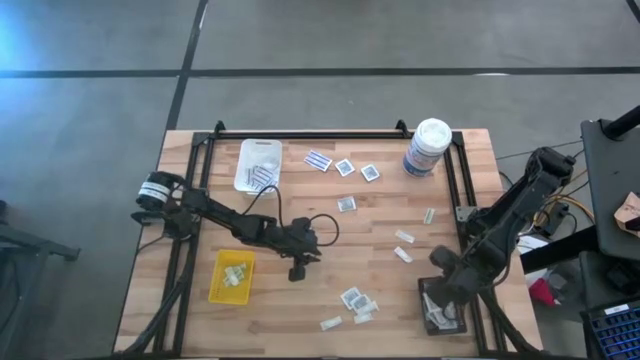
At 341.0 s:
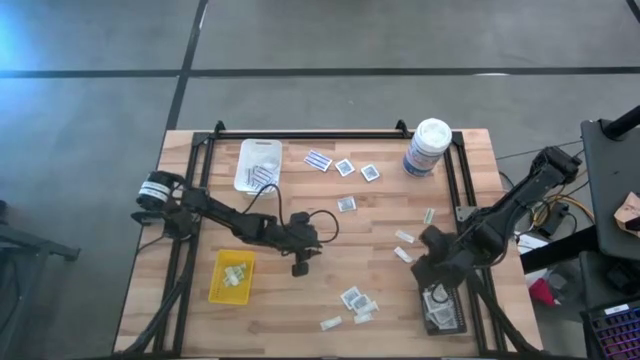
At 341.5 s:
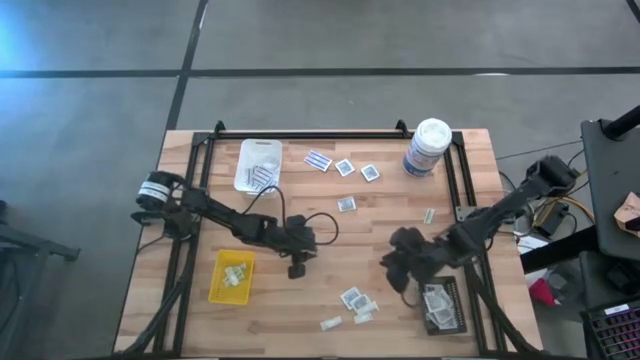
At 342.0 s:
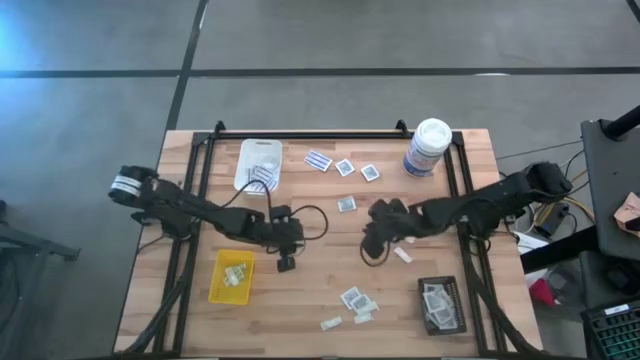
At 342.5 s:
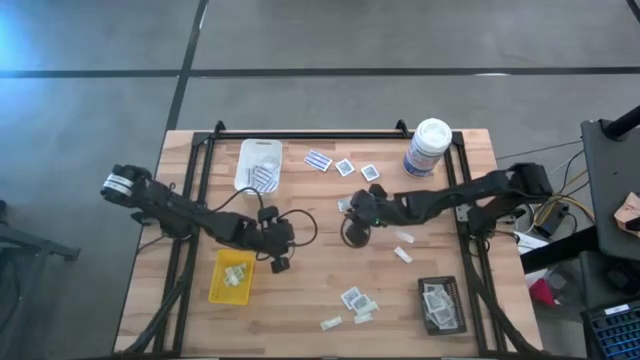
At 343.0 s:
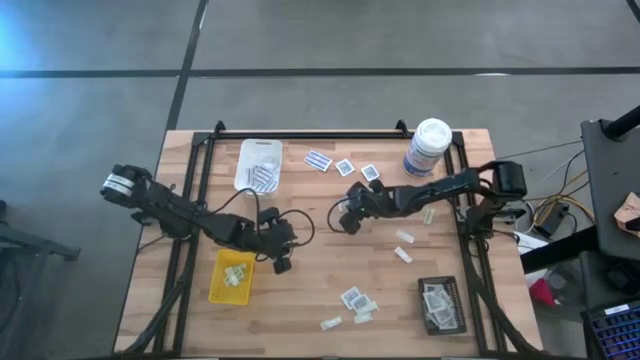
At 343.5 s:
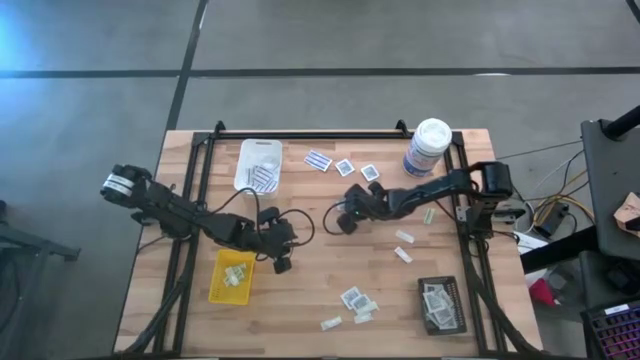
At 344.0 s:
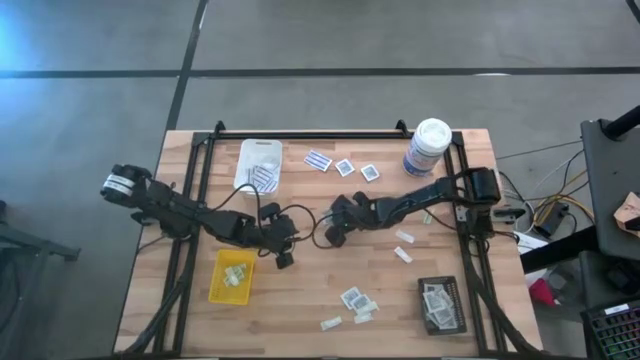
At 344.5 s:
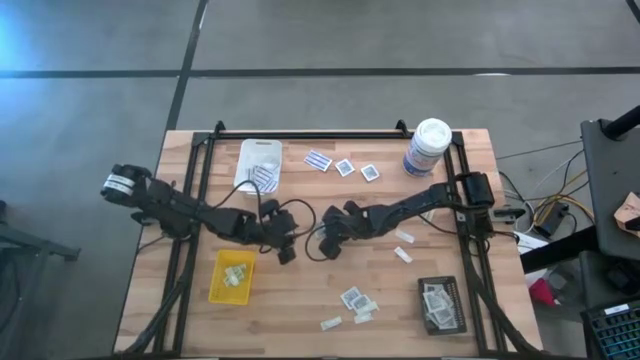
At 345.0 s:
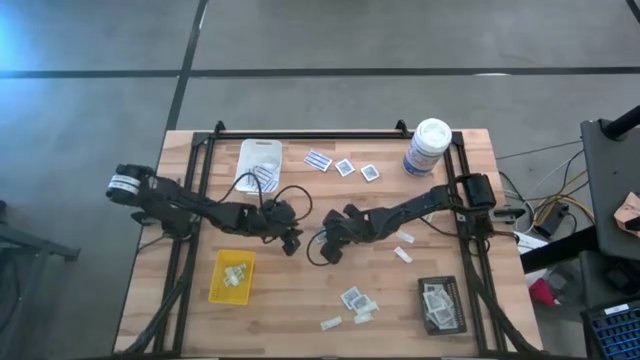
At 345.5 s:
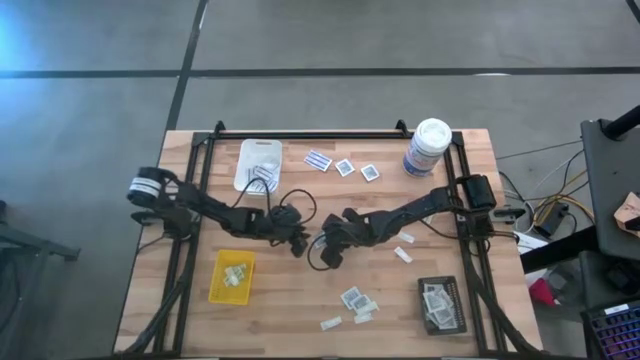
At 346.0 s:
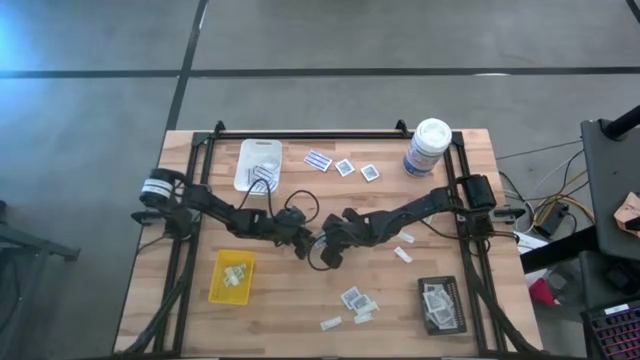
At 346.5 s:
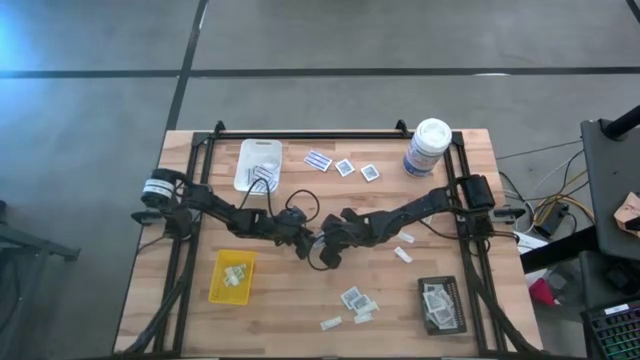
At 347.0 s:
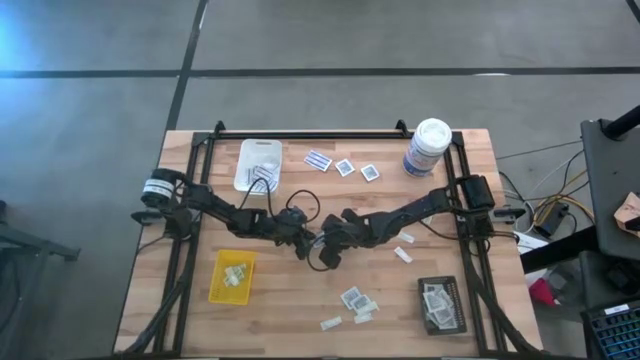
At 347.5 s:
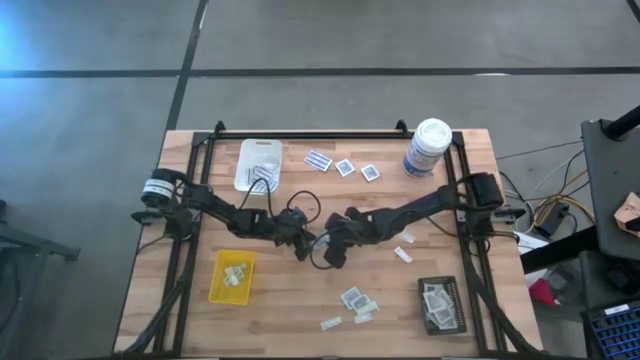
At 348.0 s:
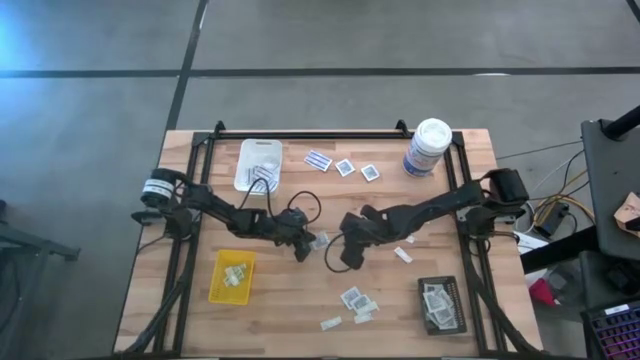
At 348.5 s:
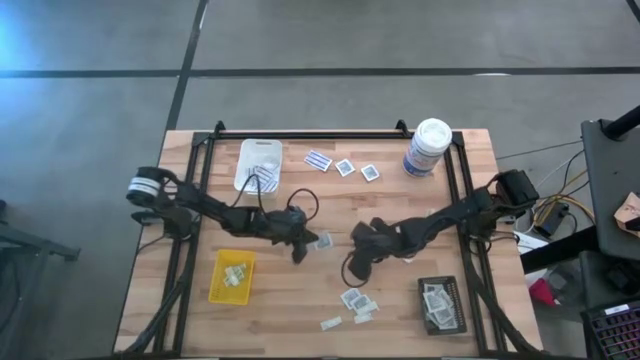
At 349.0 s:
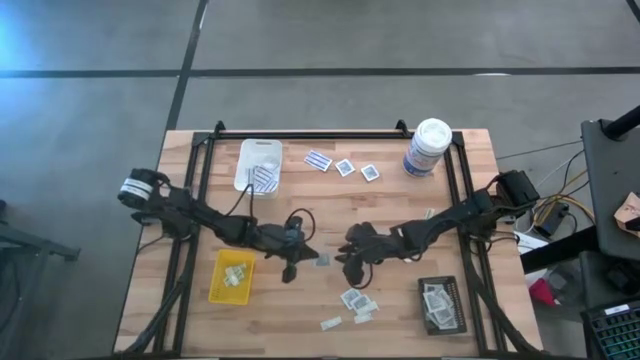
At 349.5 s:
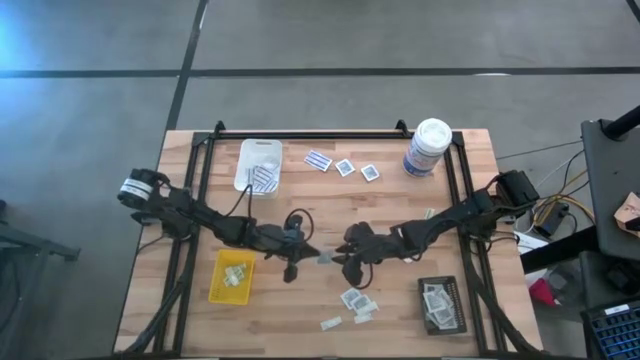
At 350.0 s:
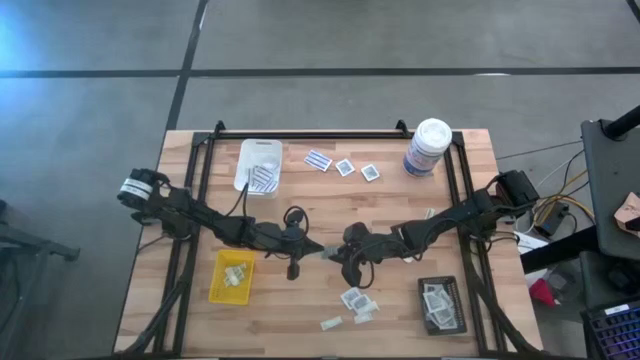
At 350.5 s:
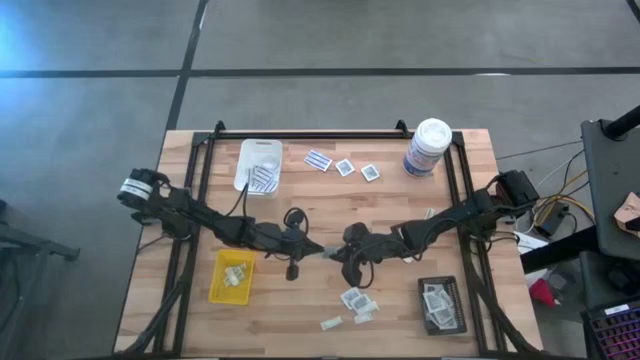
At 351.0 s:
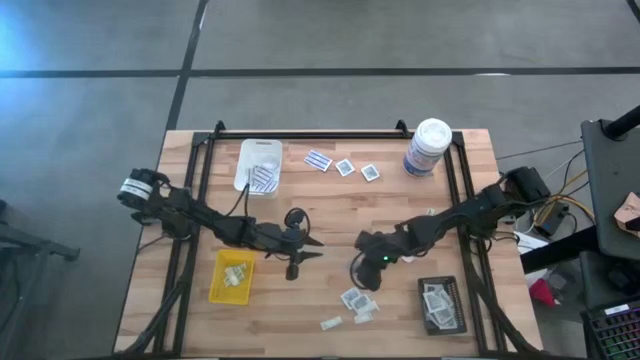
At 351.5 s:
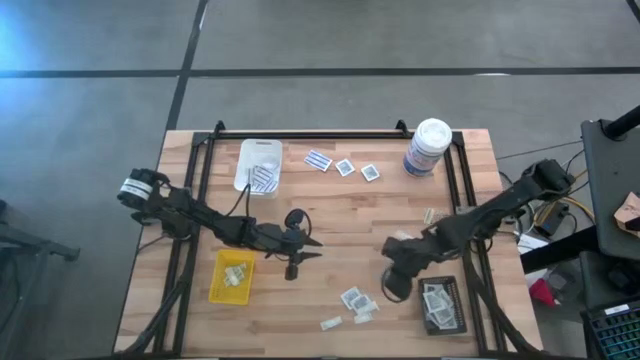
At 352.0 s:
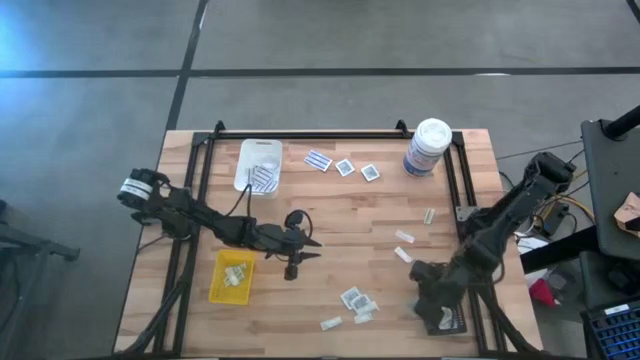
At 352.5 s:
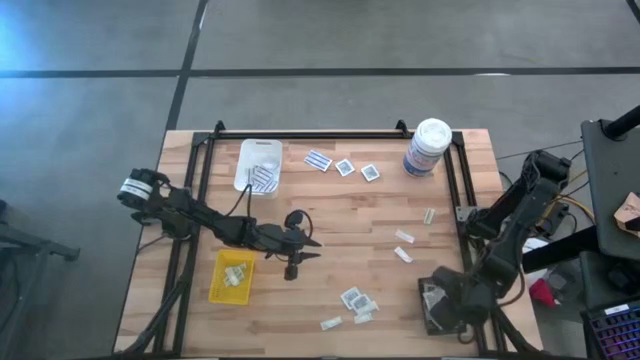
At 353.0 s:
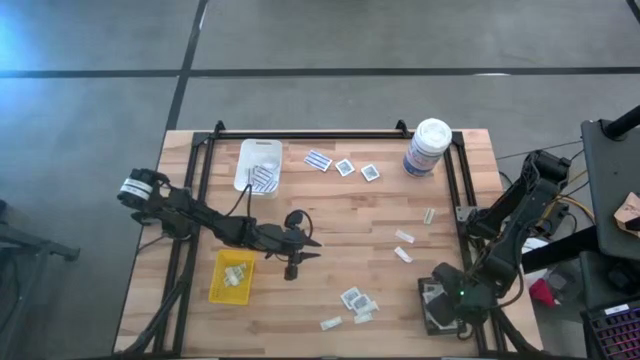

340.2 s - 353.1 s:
Task: Pick & Place First Aid Supplies
Put the towelette pack into the black bin

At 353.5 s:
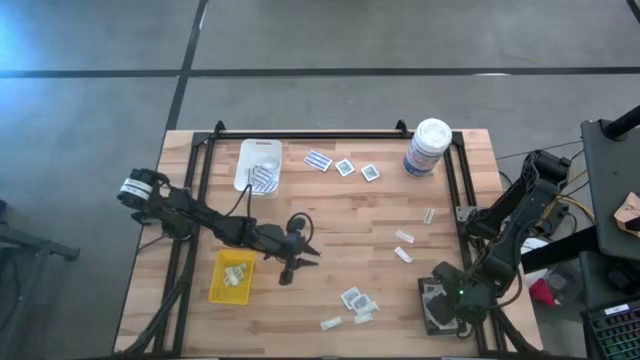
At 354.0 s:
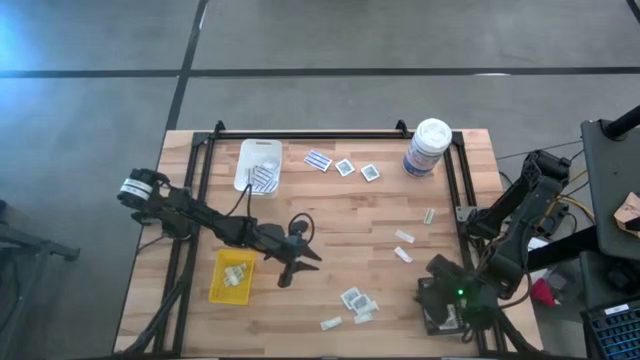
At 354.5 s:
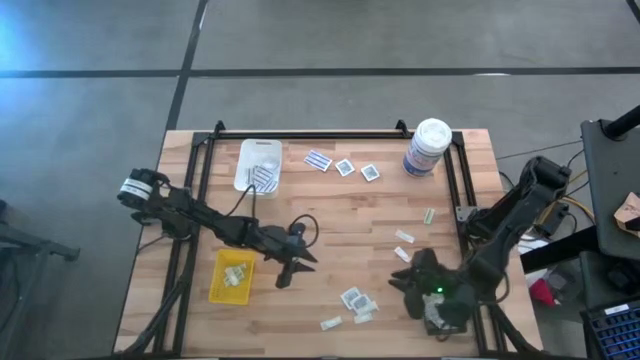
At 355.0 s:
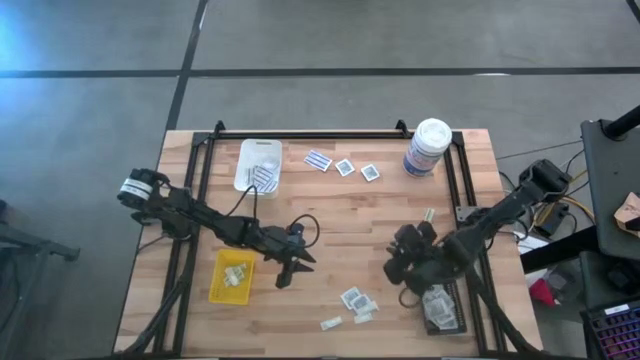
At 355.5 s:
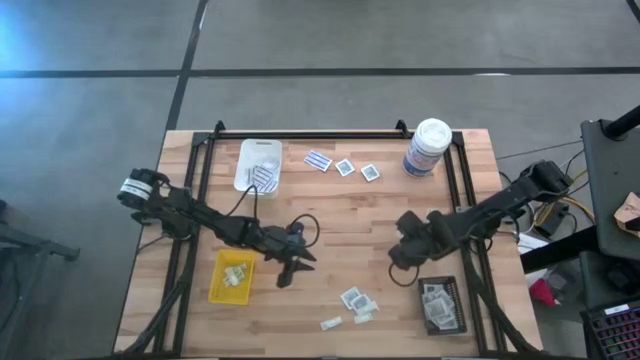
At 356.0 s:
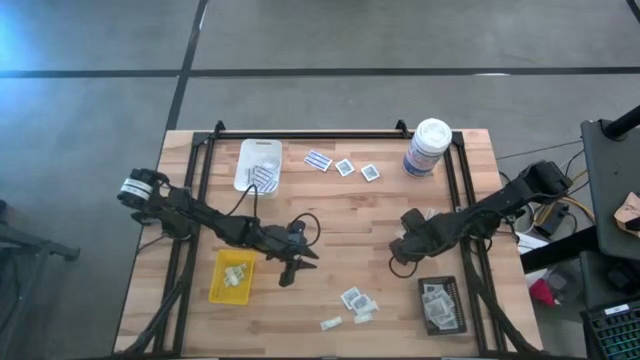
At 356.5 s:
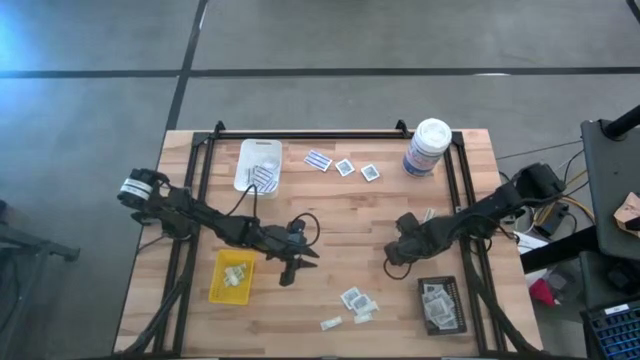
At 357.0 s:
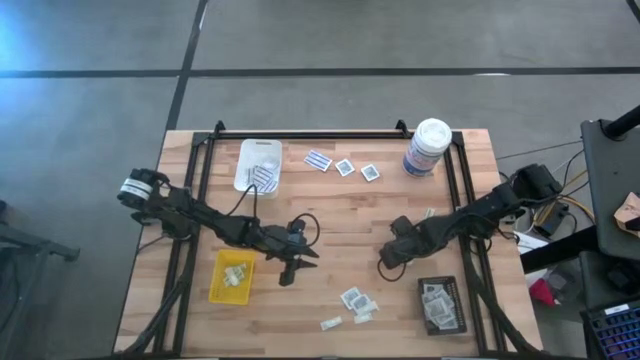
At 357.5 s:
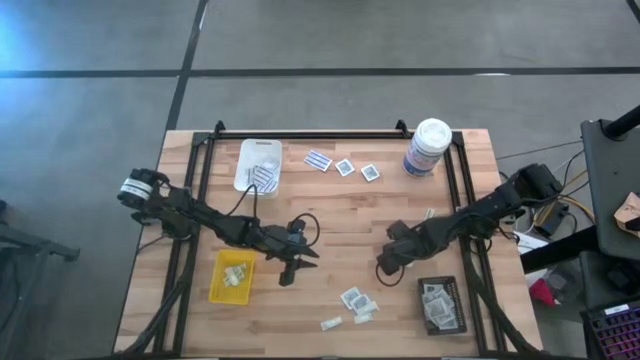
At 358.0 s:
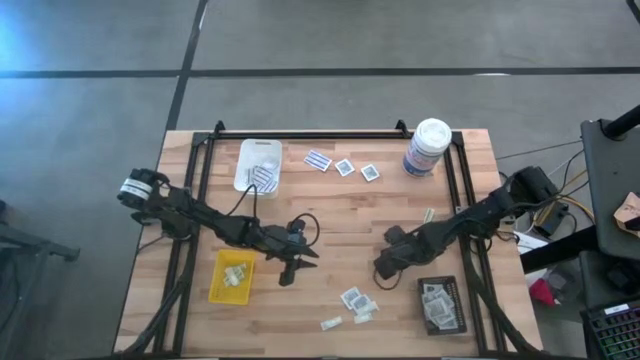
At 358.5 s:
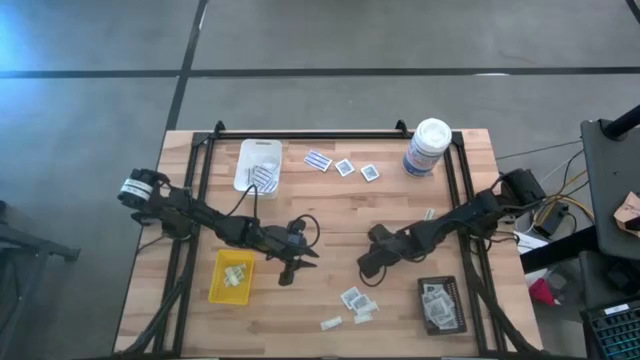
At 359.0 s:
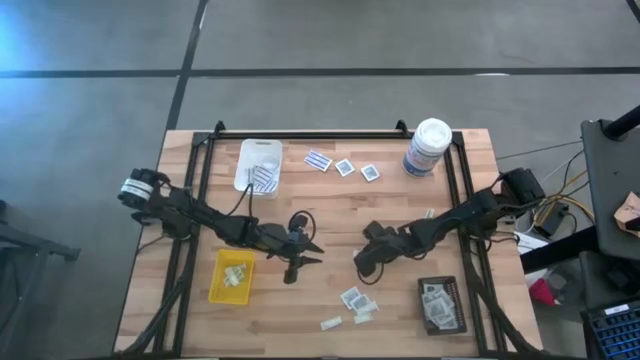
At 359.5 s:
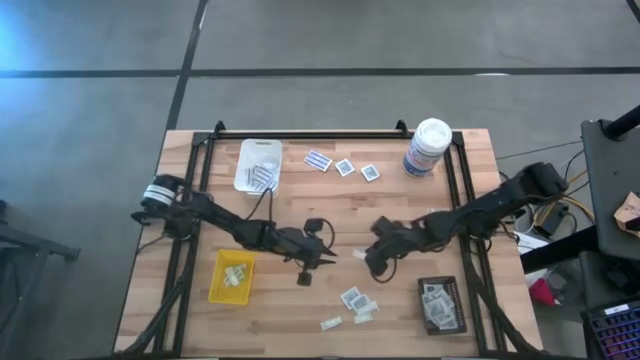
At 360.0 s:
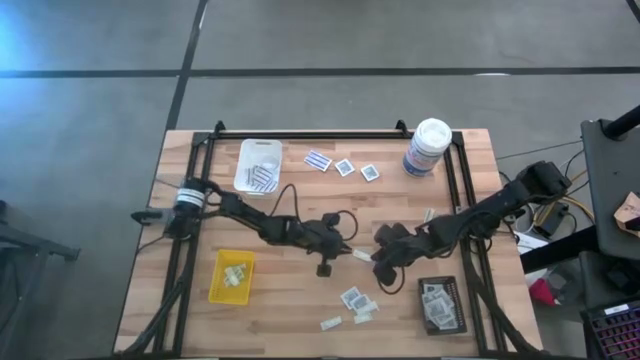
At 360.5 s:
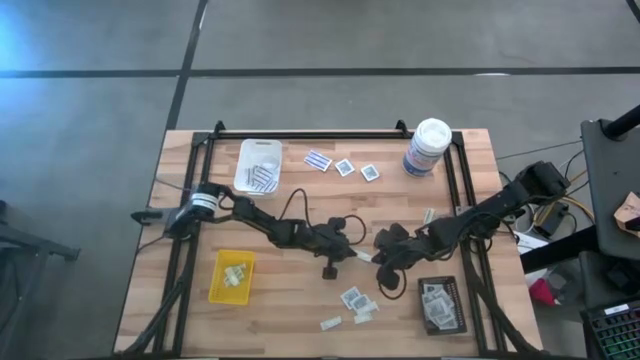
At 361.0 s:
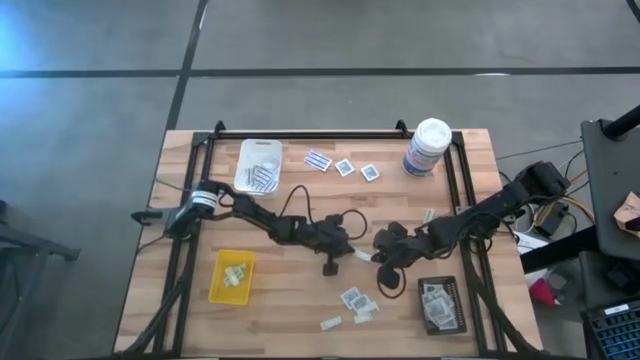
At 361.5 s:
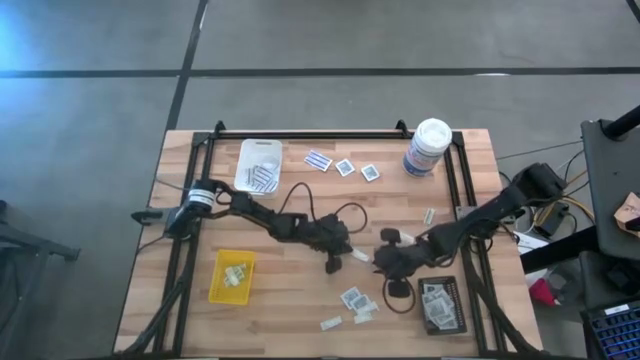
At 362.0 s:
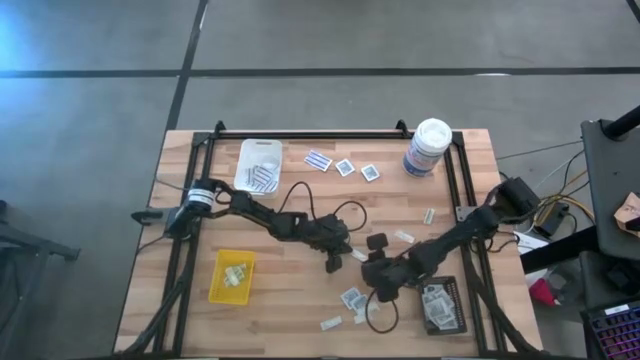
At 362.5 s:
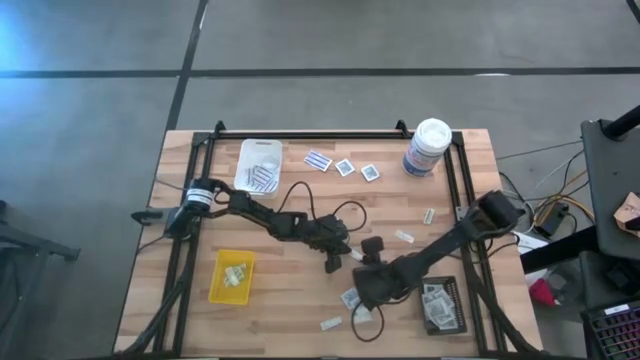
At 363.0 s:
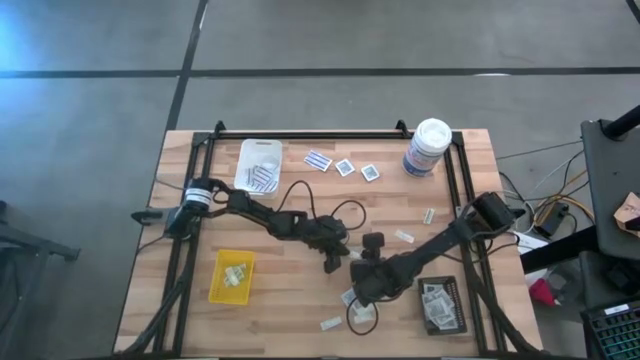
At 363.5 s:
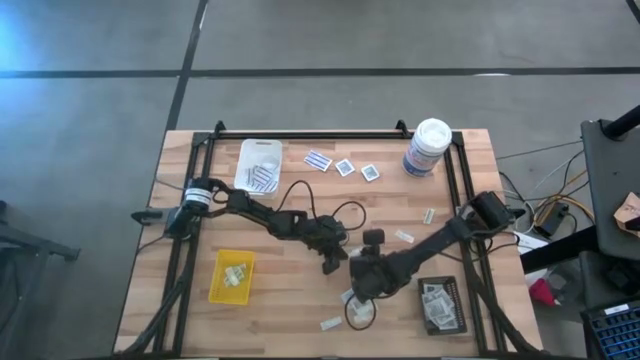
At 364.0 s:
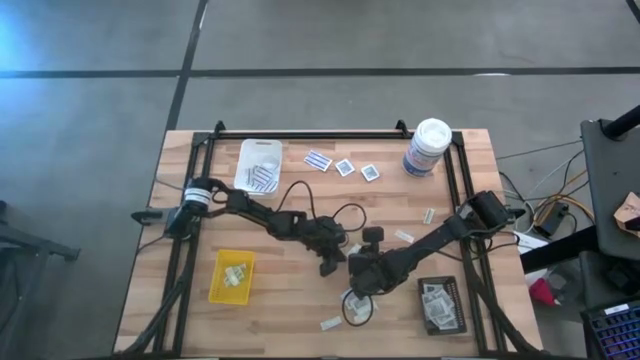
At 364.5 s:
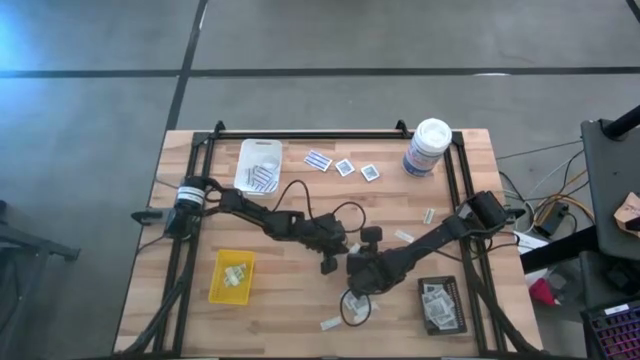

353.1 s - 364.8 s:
Put the green bandage into the yellow bin
